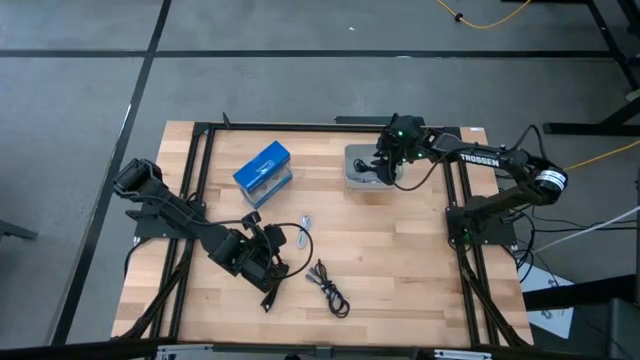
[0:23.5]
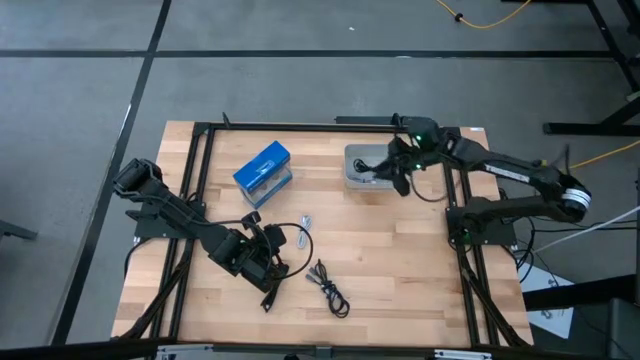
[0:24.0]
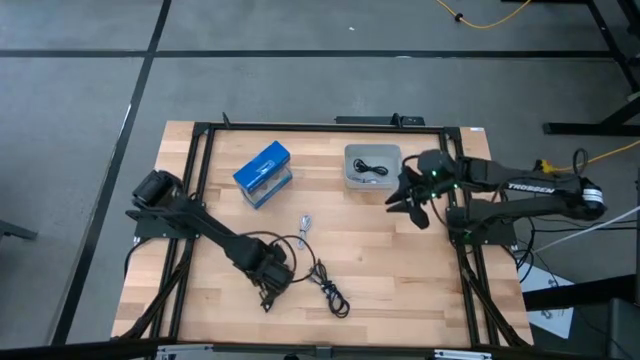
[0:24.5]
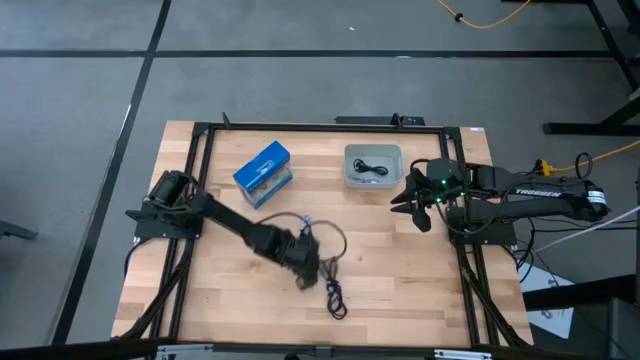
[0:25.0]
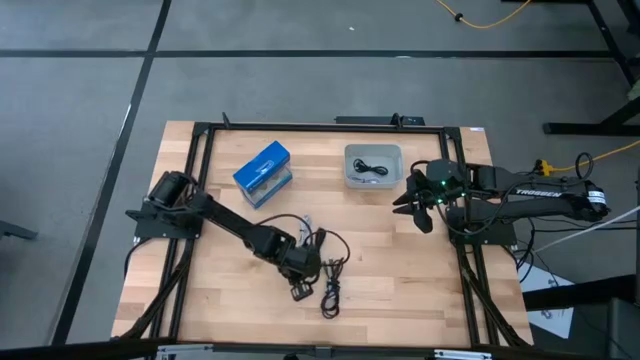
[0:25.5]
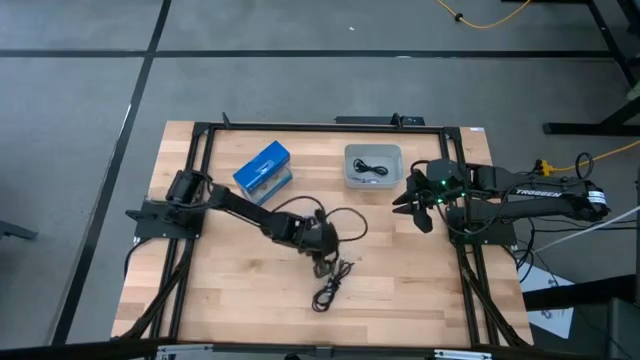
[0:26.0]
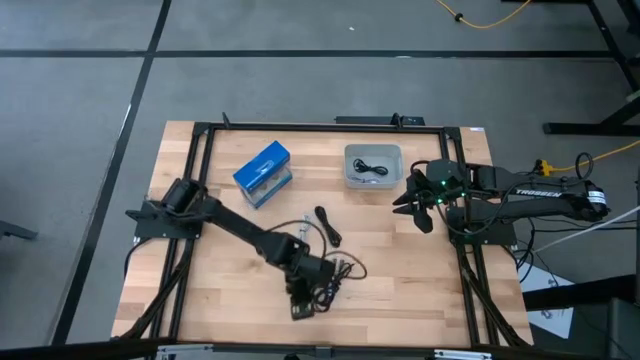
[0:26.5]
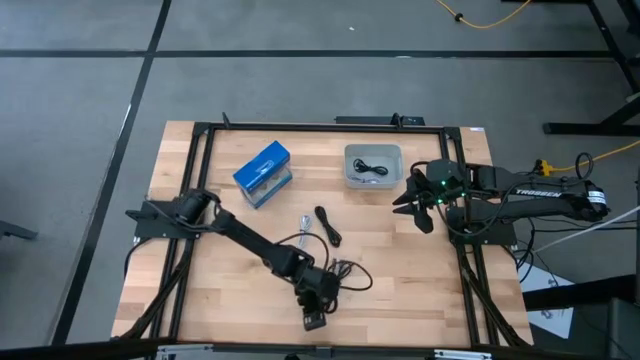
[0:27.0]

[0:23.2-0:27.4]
Task: Pick and place USB-C Cables
Move the black charger cables to the center of the table

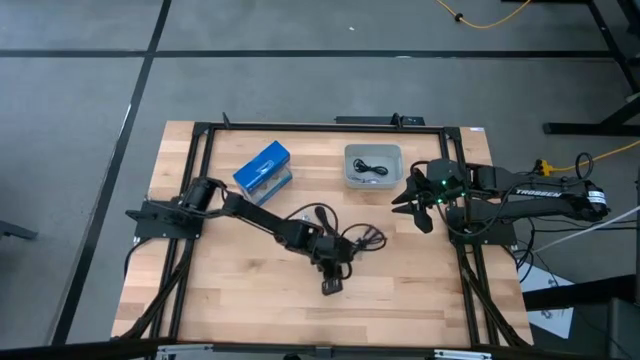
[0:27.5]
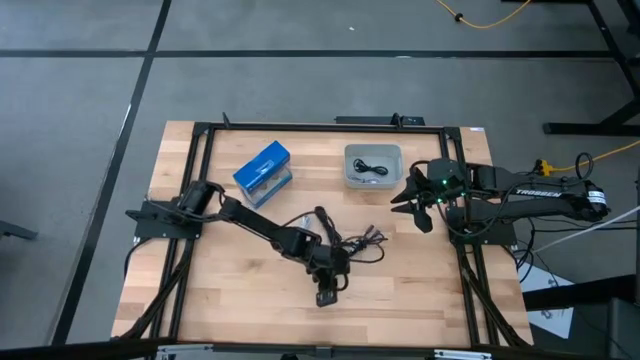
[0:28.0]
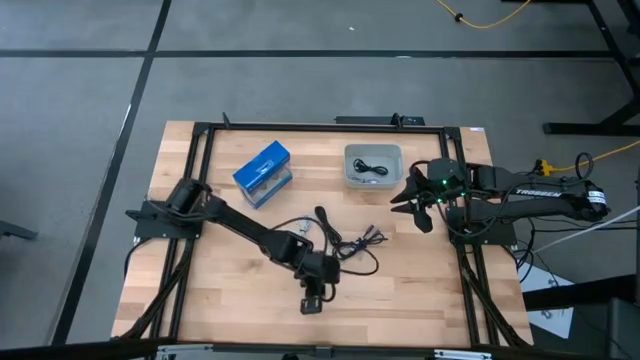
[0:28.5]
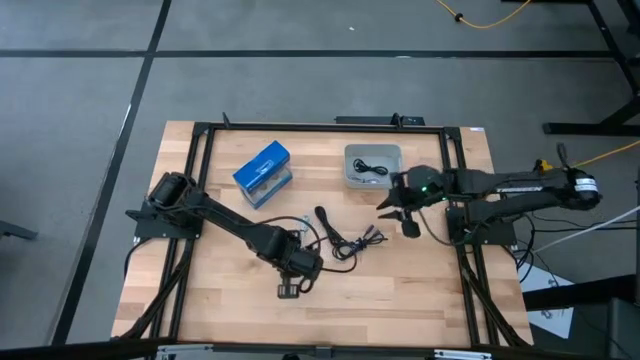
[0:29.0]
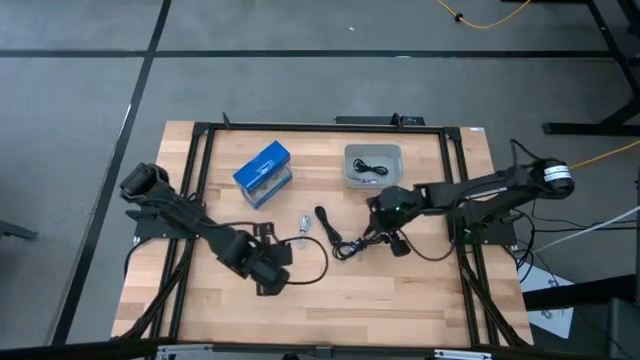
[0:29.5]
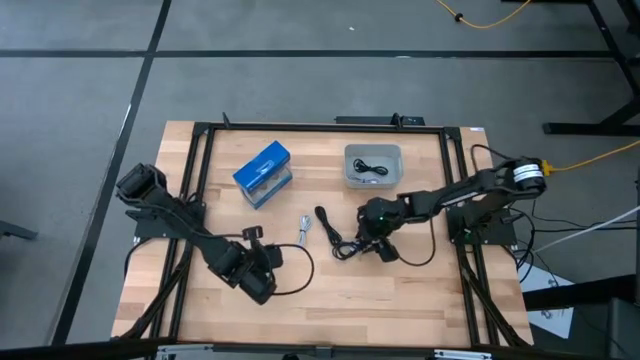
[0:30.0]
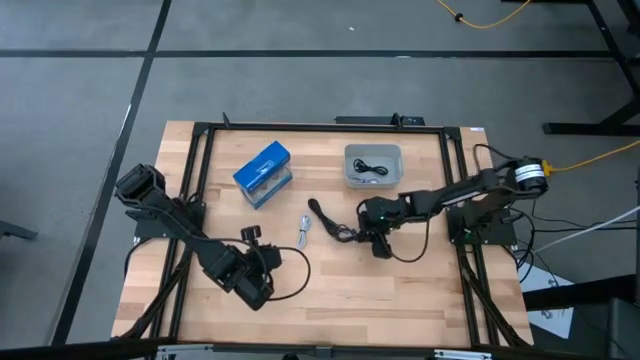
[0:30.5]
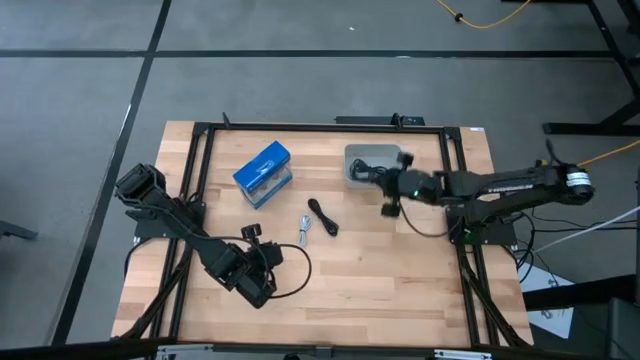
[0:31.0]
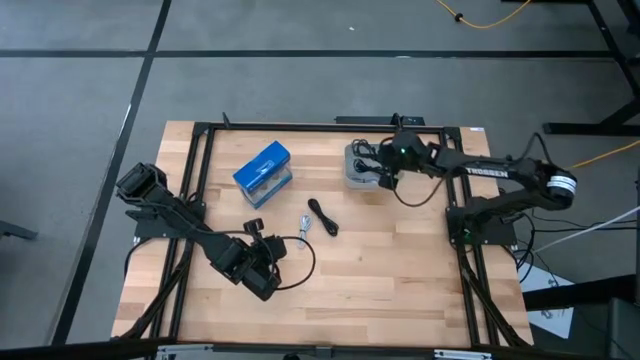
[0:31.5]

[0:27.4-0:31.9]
Put the bottom black charger cable into the gray bin

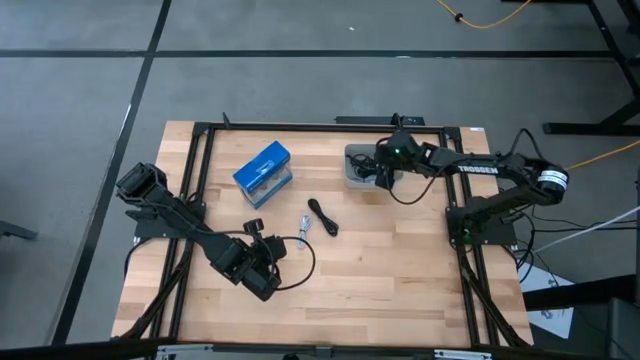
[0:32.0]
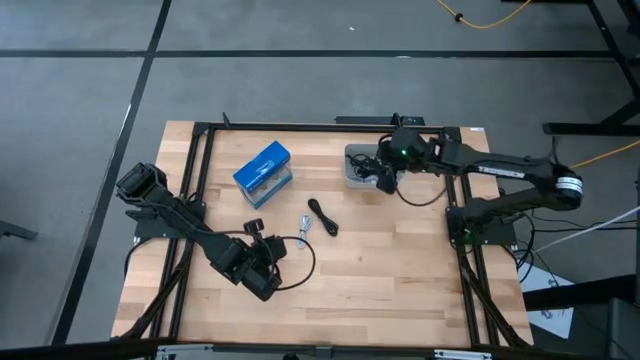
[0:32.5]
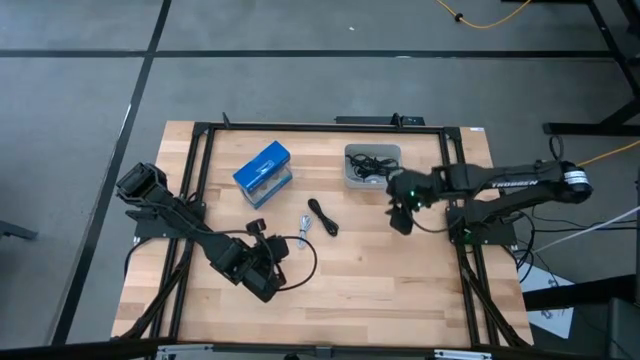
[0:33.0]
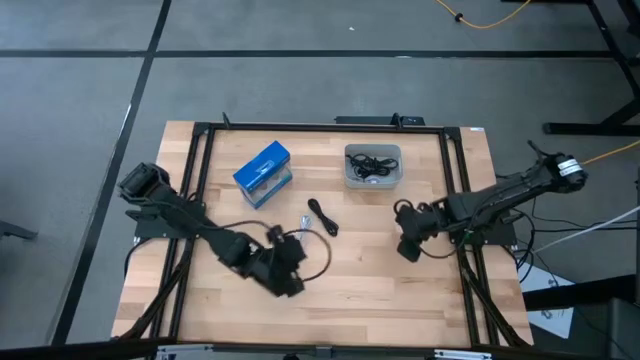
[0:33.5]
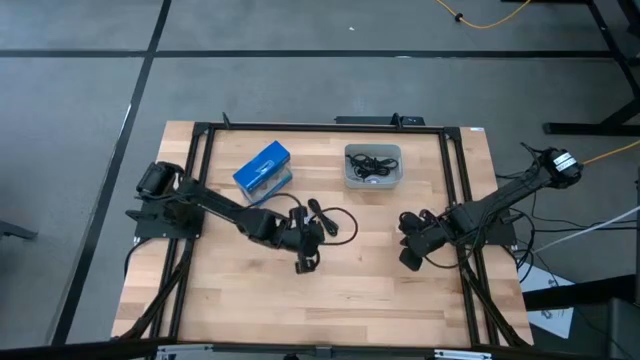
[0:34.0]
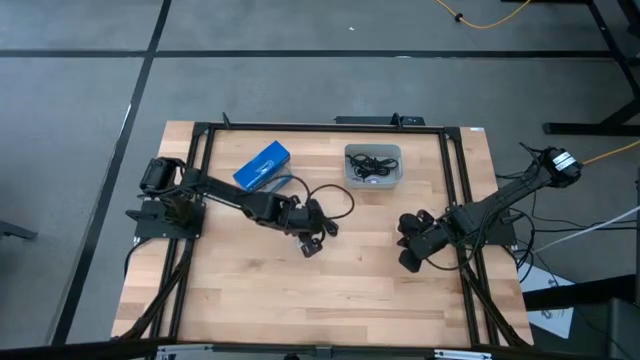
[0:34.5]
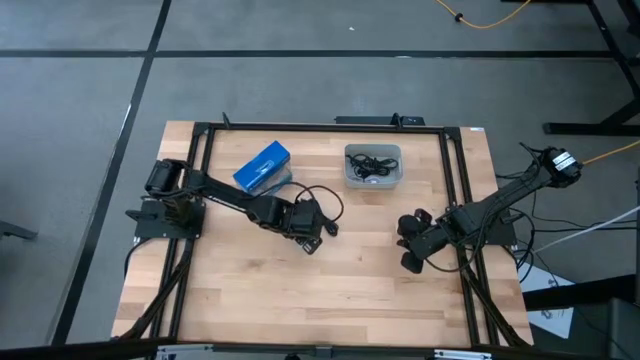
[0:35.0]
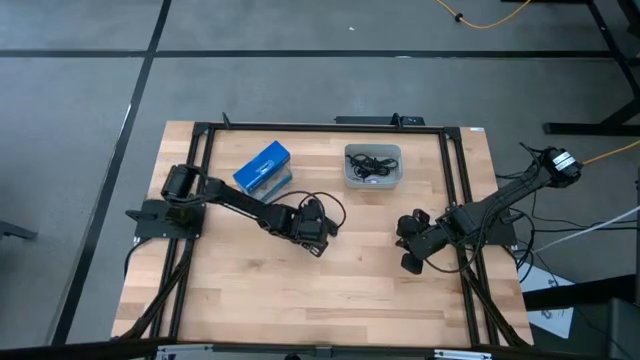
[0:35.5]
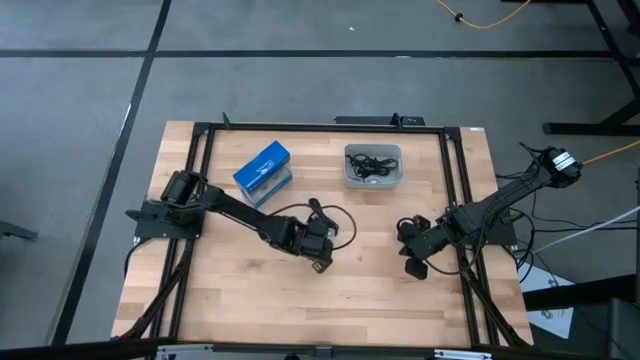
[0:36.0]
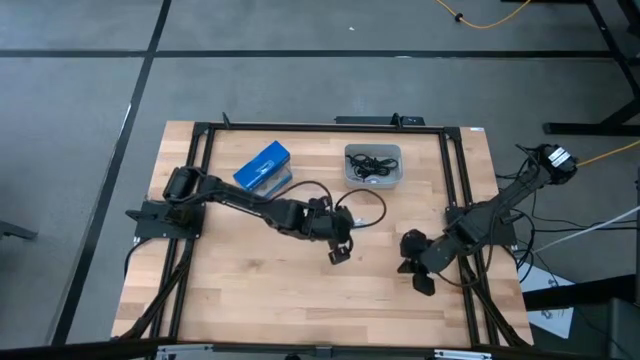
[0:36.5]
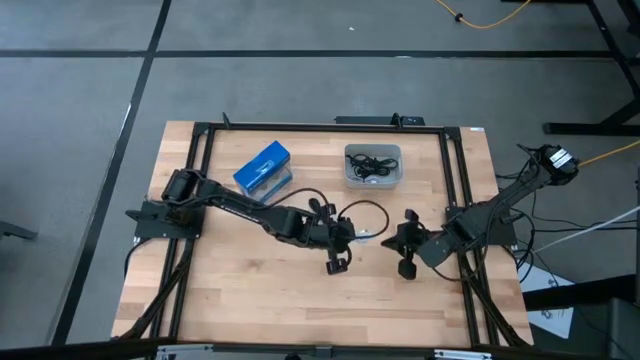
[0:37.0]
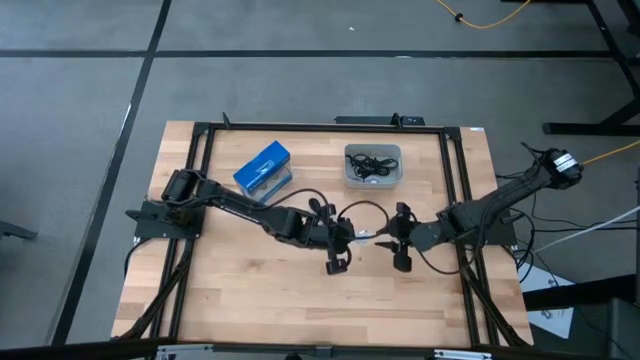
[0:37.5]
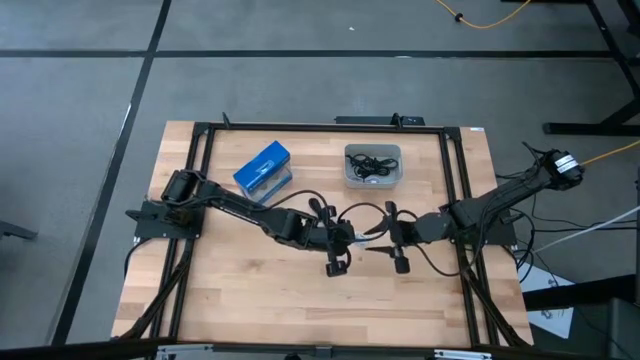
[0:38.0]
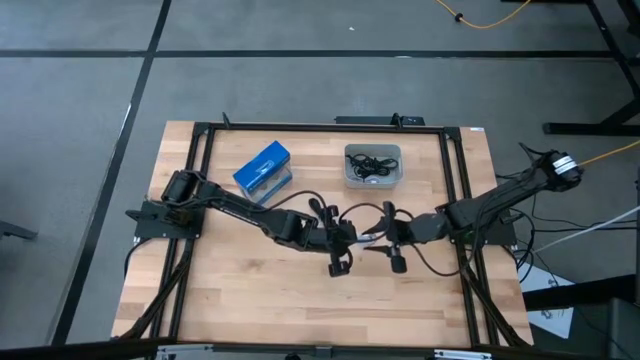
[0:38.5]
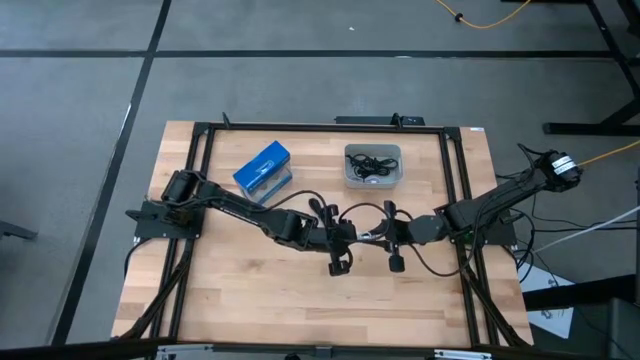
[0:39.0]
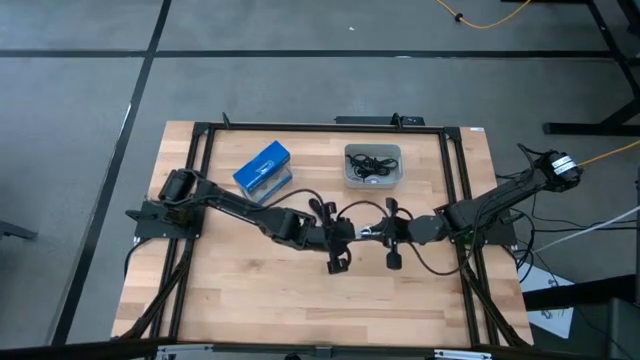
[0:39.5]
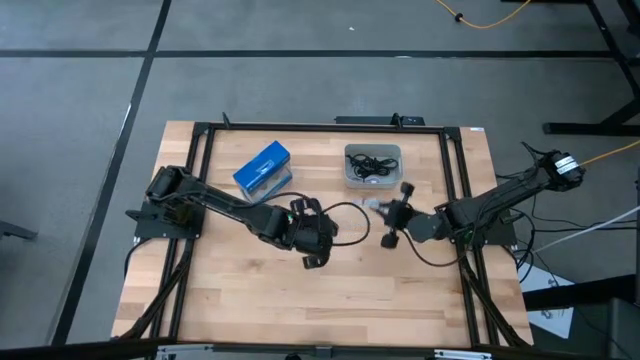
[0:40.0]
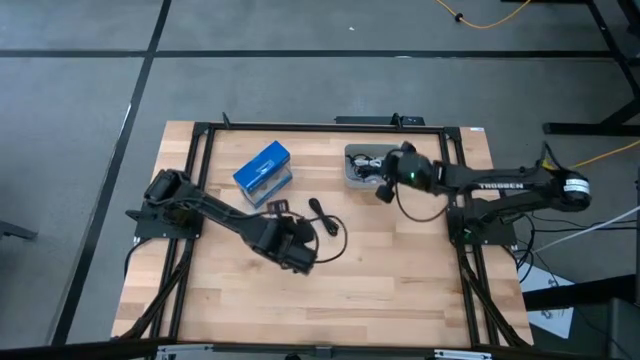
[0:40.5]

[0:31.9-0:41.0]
Put the white charger cable into the gray bin

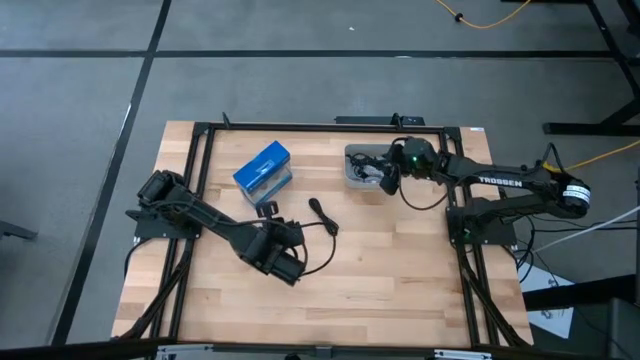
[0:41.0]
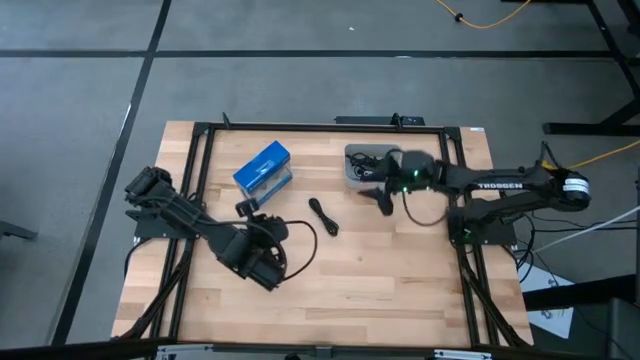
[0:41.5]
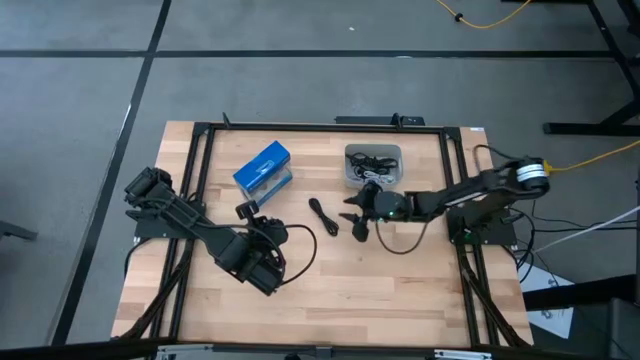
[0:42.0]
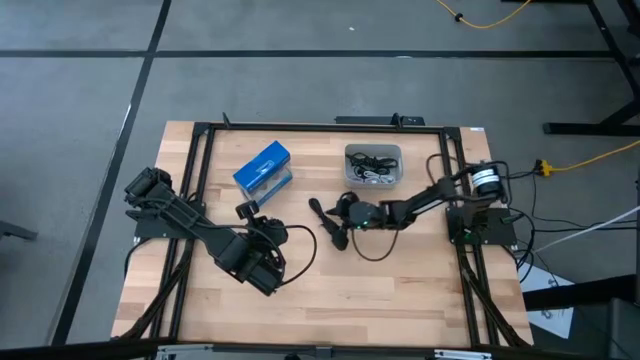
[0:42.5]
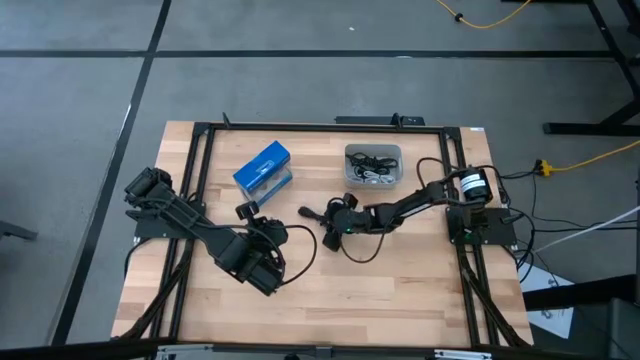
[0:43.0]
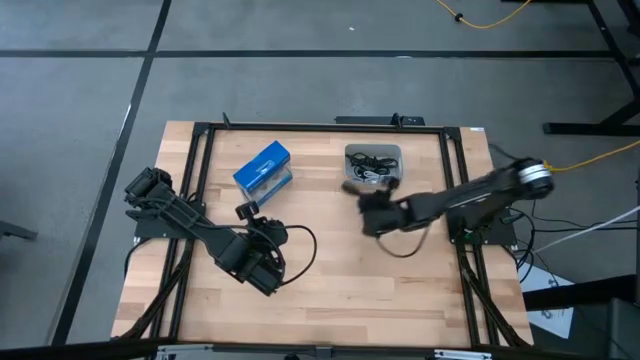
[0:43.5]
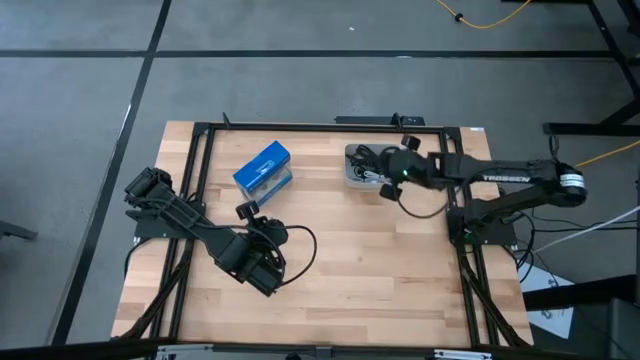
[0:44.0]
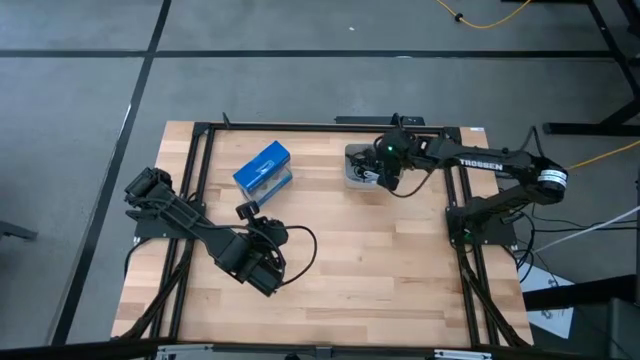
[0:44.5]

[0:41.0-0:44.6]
Put the black charger cable into the gray bin
